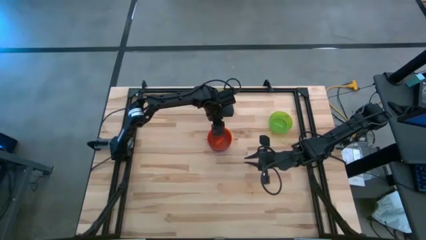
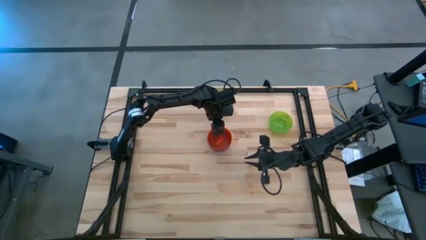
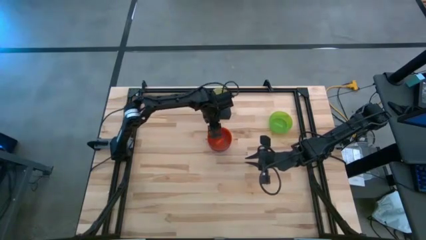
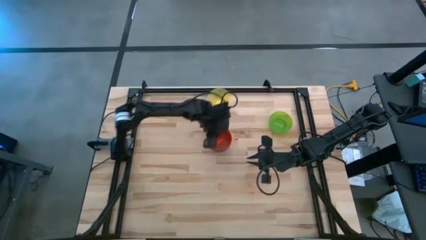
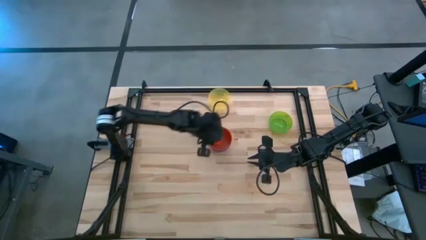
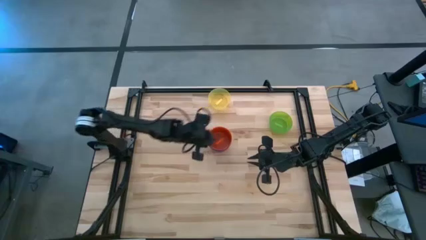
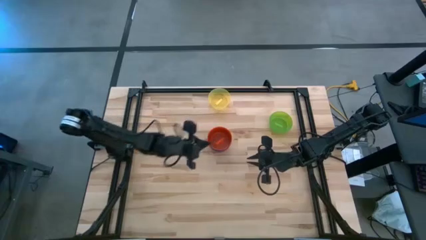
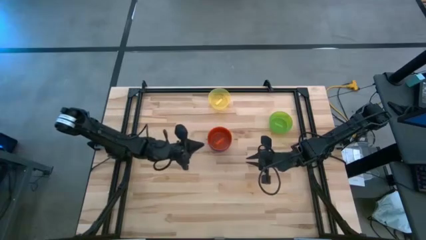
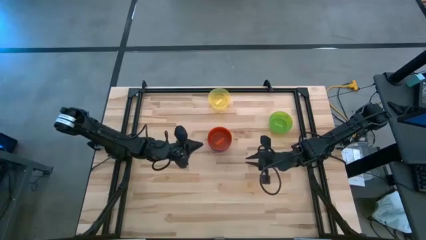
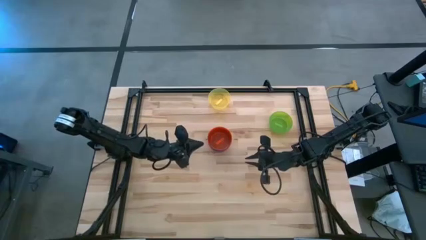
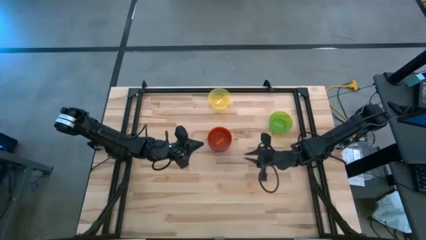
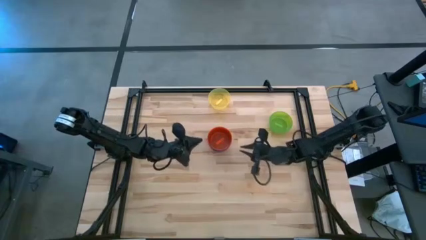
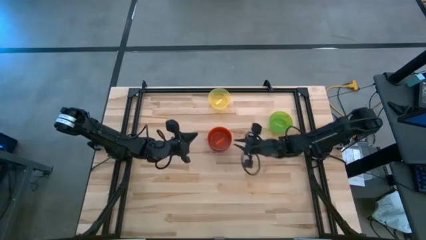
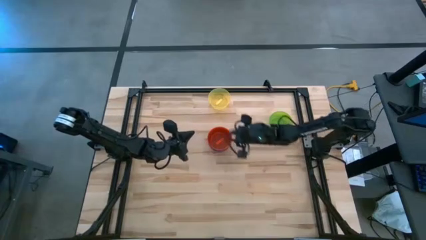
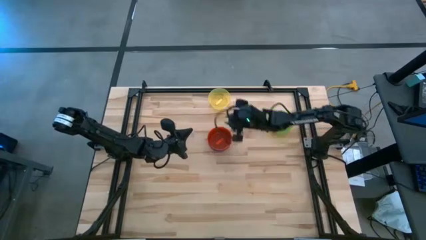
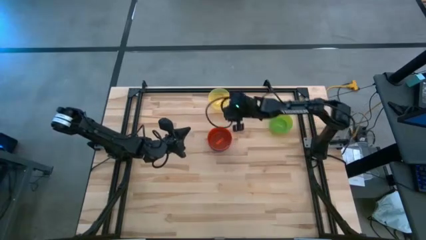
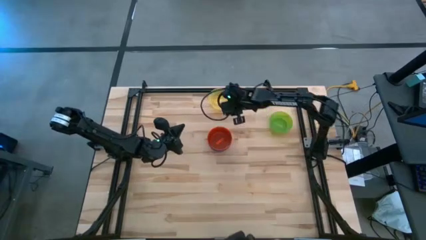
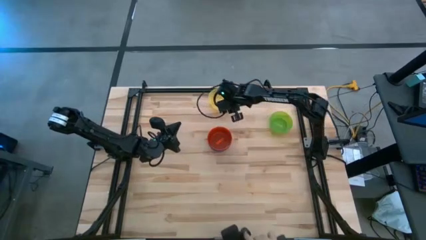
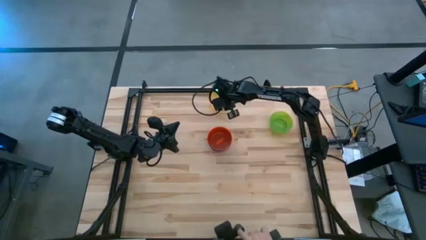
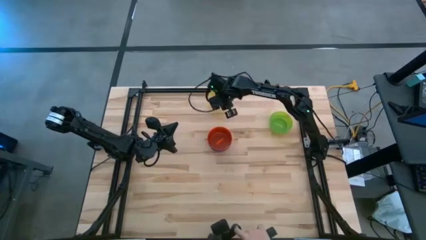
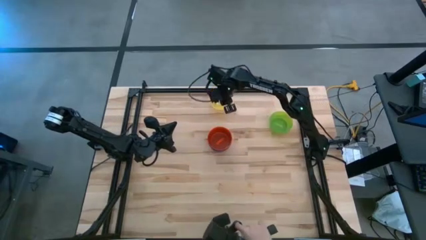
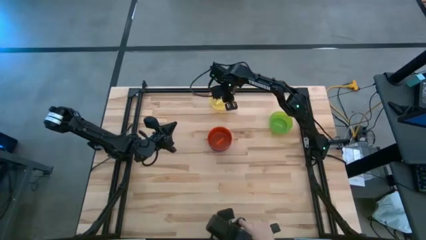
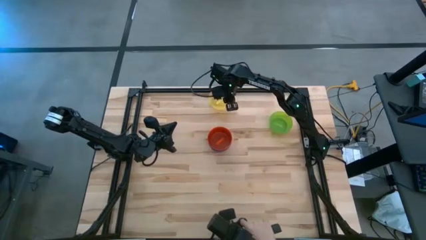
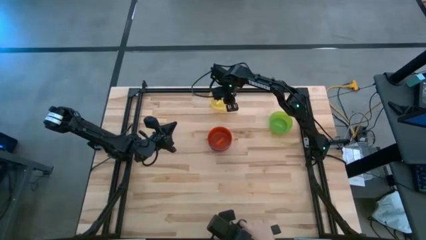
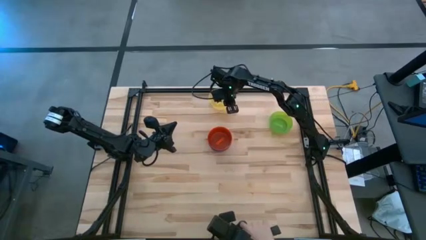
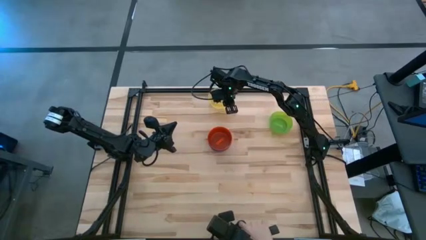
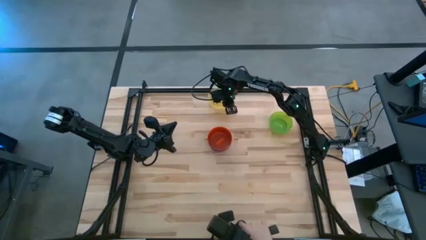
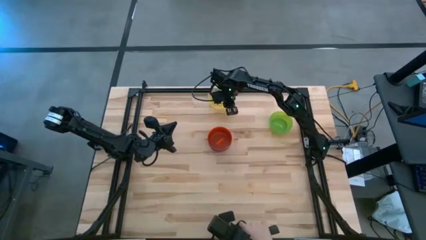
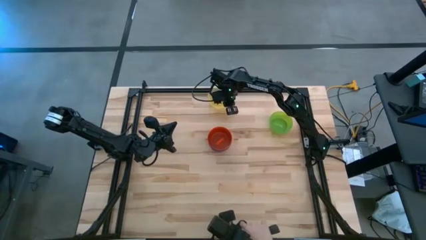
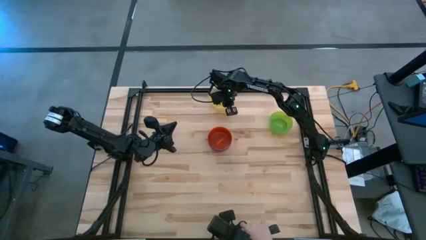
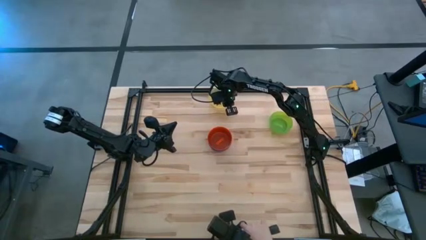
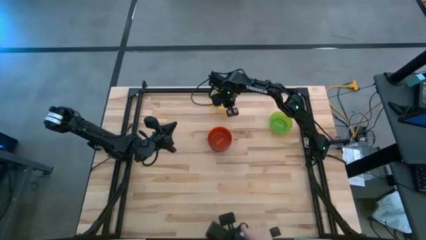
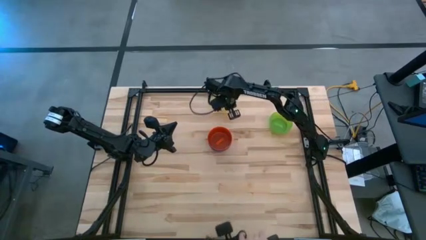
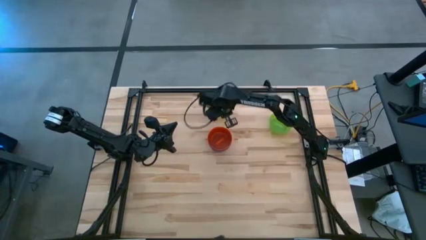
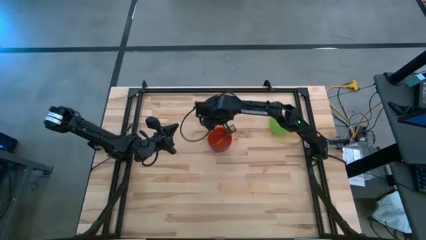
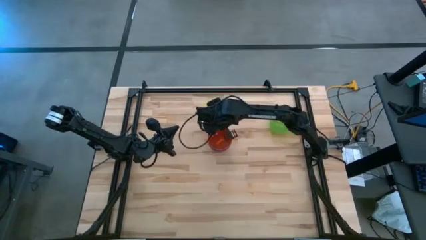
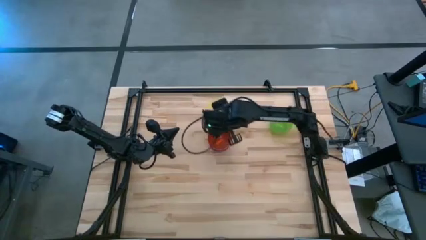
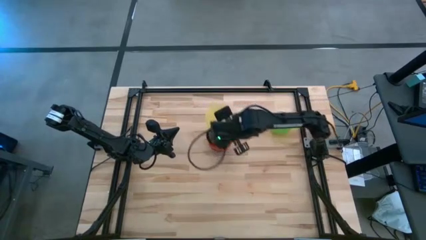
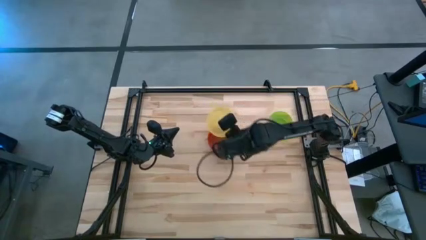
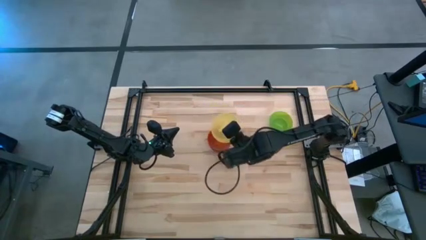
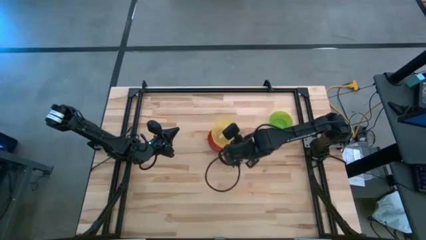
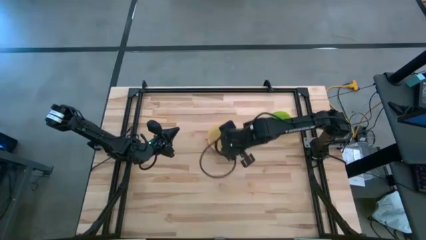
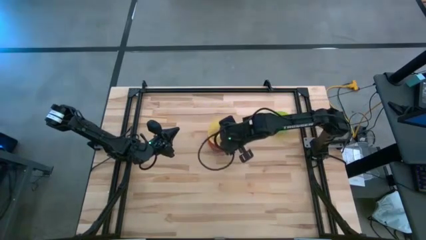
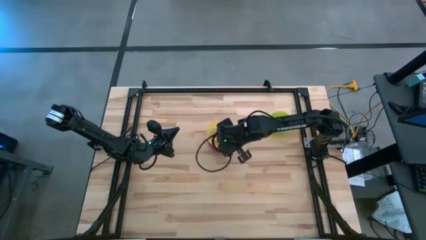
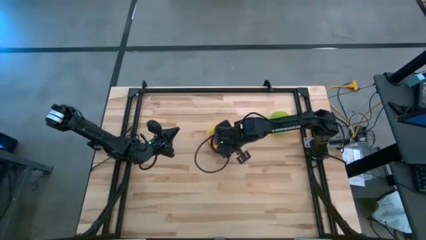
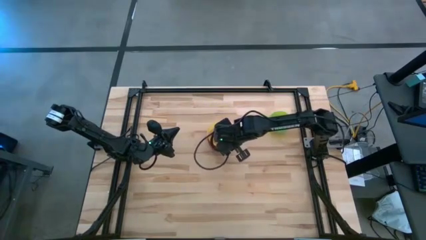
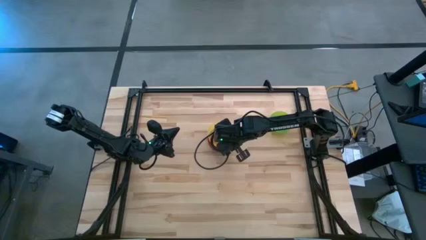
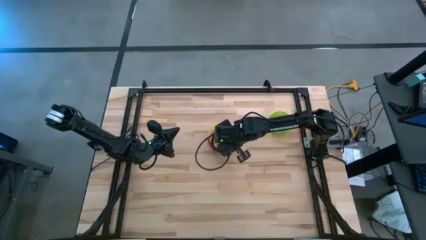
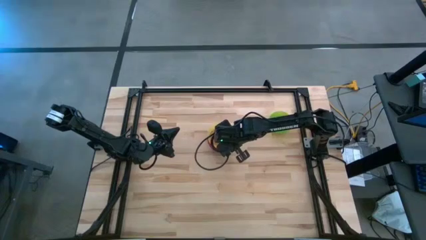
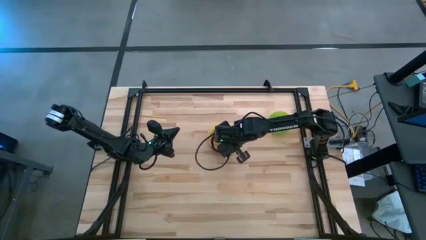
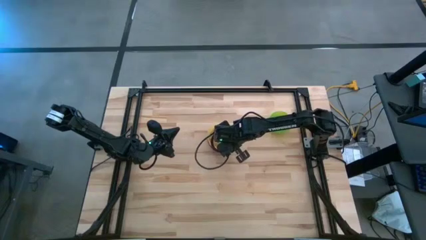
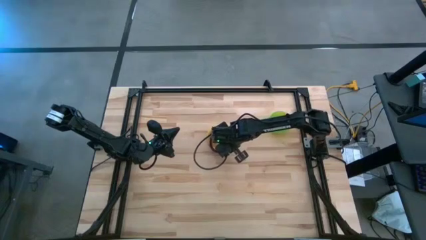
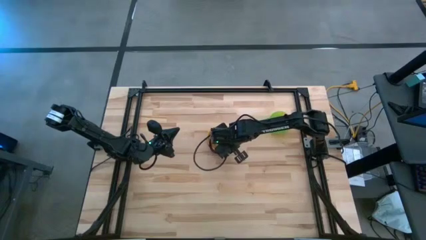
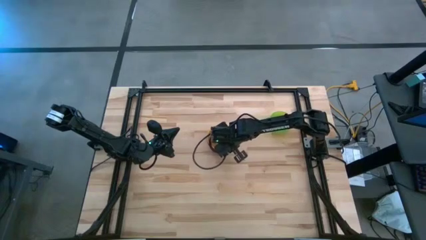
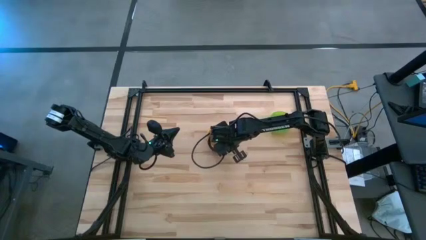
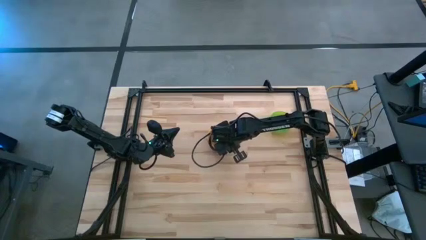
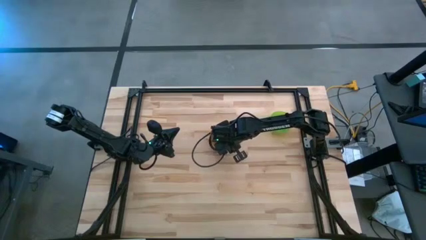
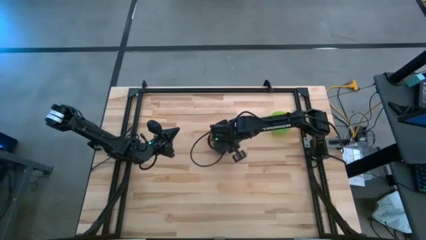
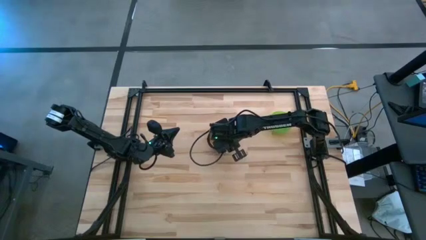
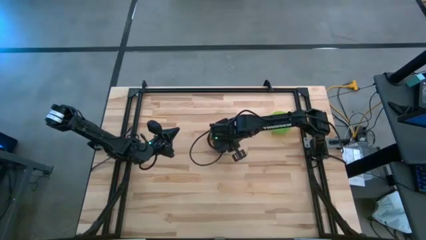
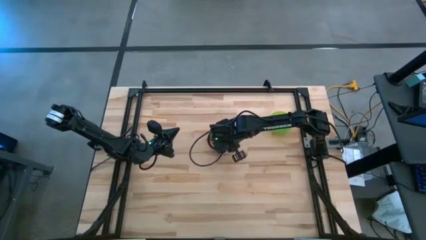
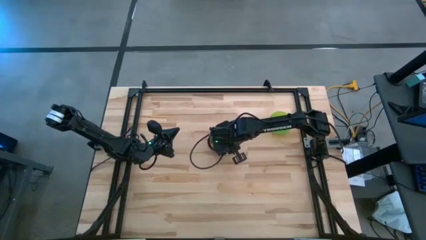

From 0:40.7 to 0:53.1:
Task: Nest bowls inside each other
Stack the yellow bowl on top of the orange bowl
